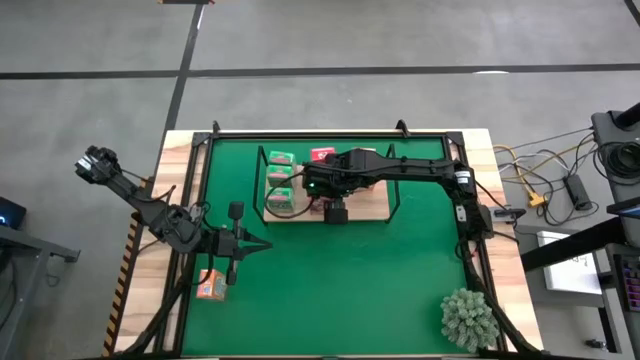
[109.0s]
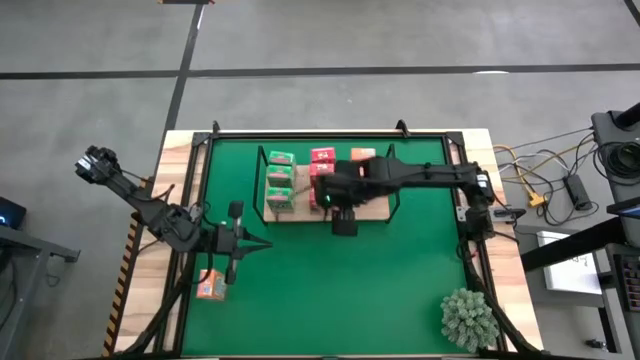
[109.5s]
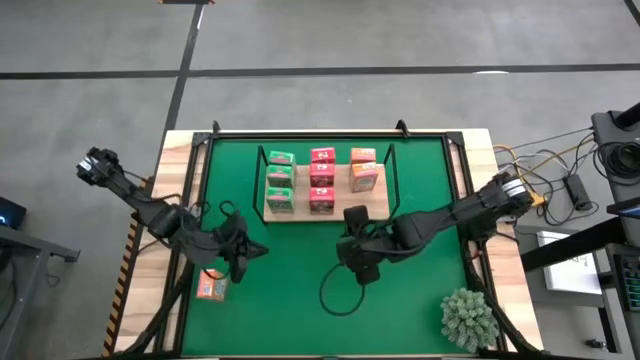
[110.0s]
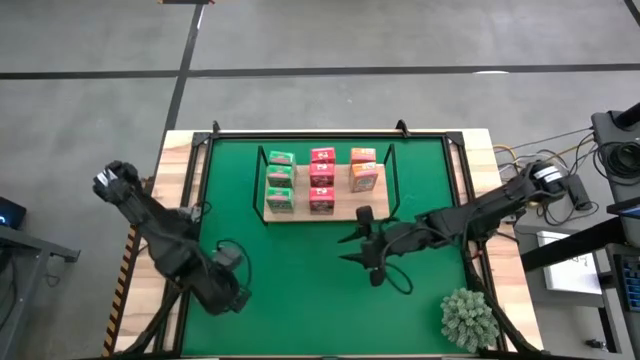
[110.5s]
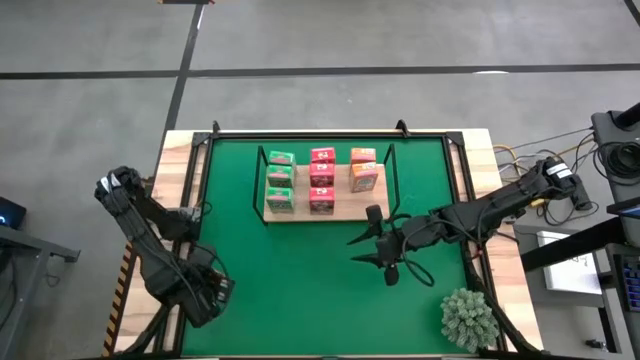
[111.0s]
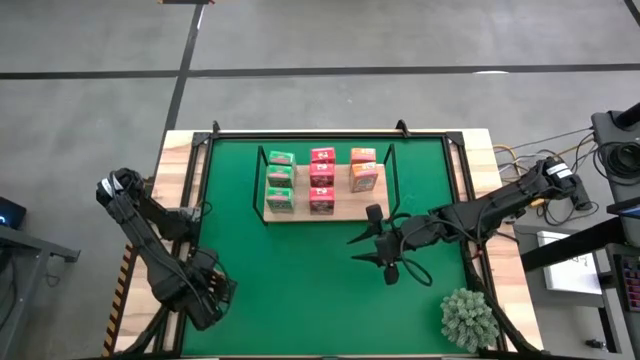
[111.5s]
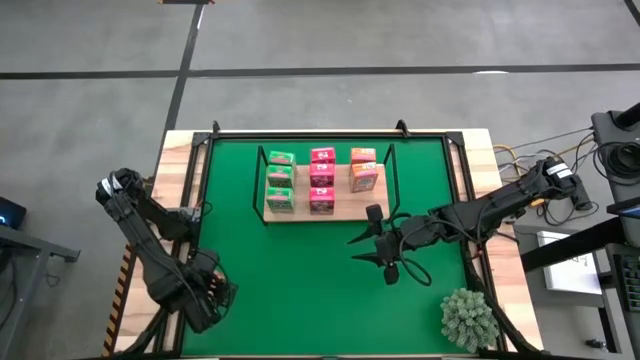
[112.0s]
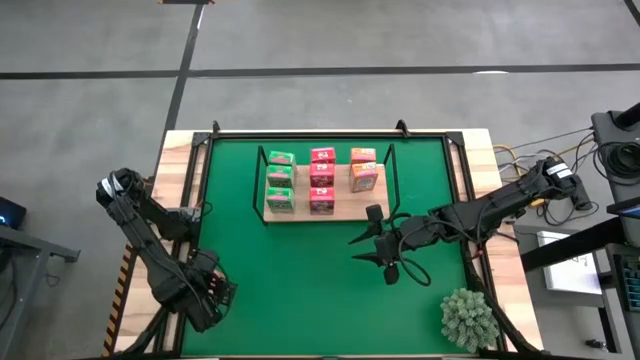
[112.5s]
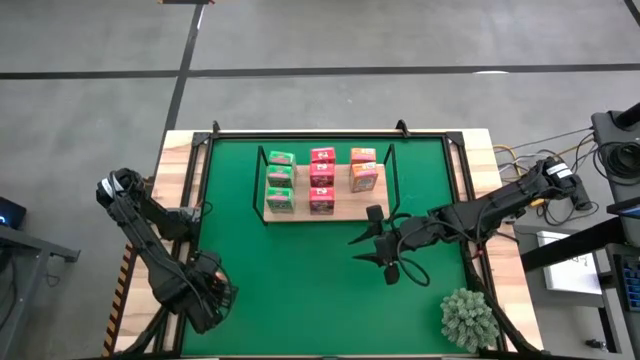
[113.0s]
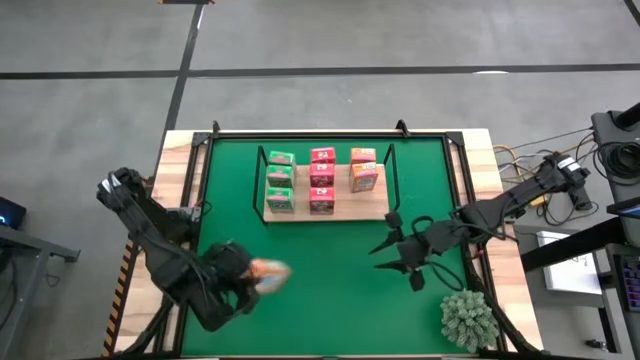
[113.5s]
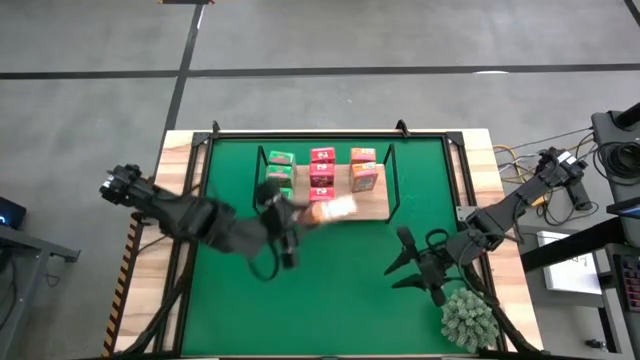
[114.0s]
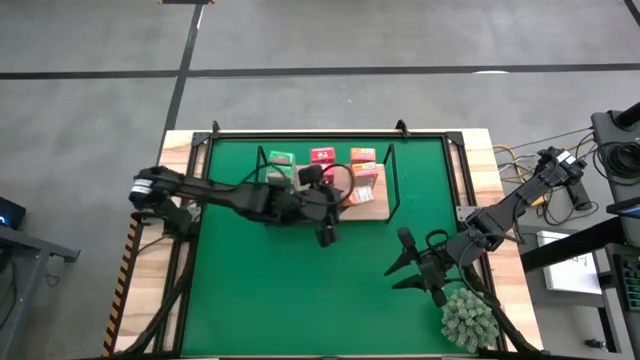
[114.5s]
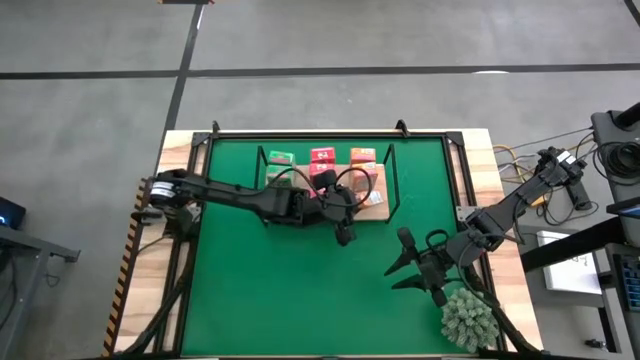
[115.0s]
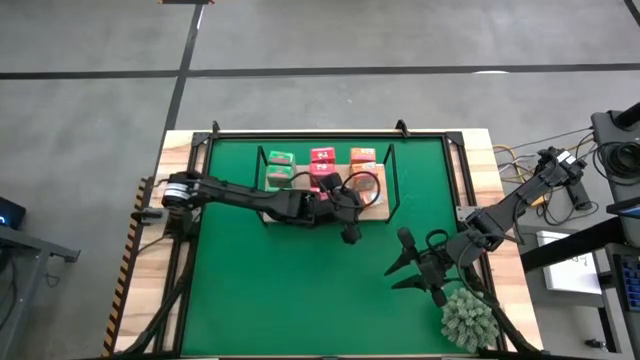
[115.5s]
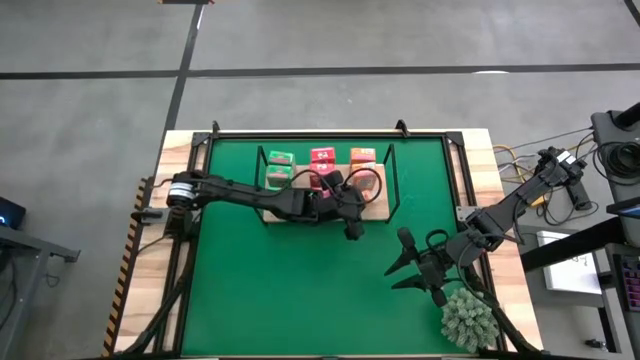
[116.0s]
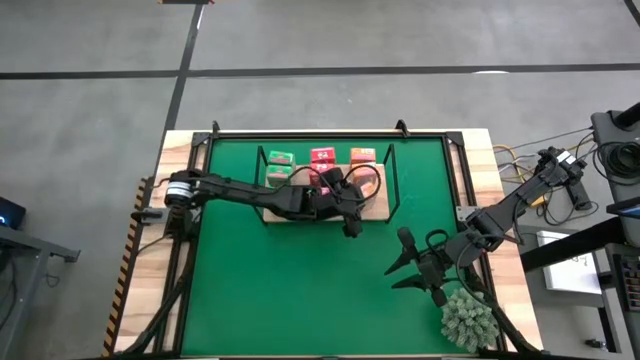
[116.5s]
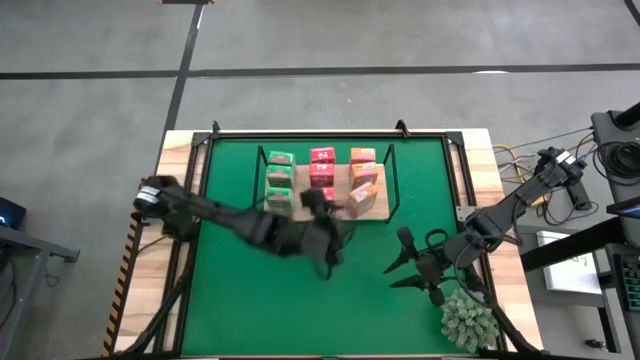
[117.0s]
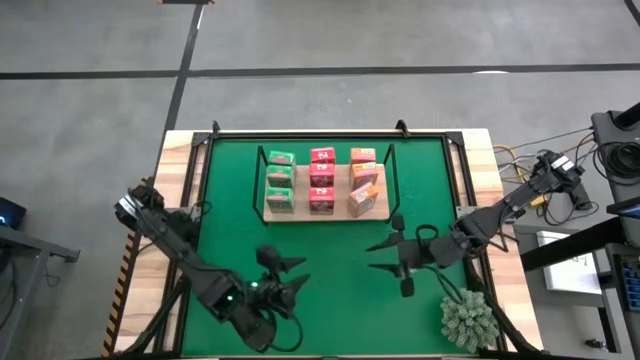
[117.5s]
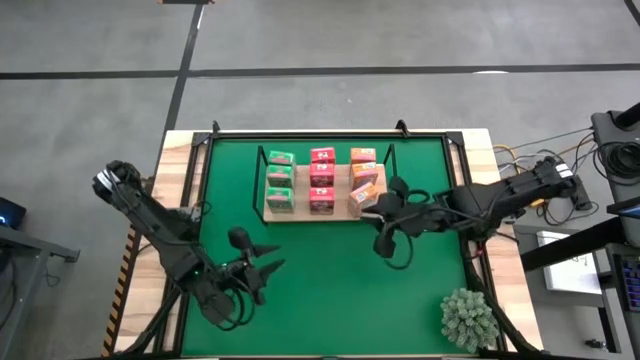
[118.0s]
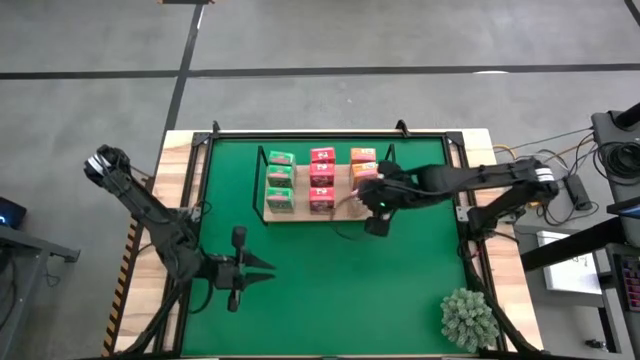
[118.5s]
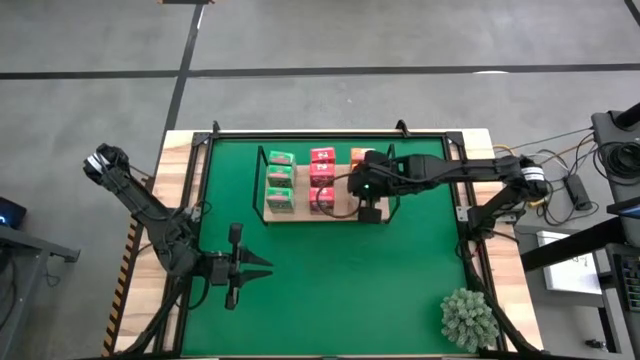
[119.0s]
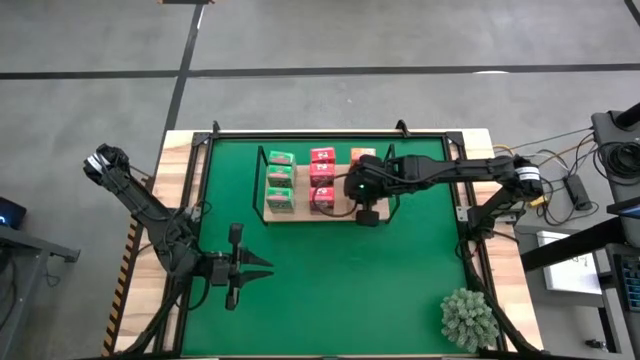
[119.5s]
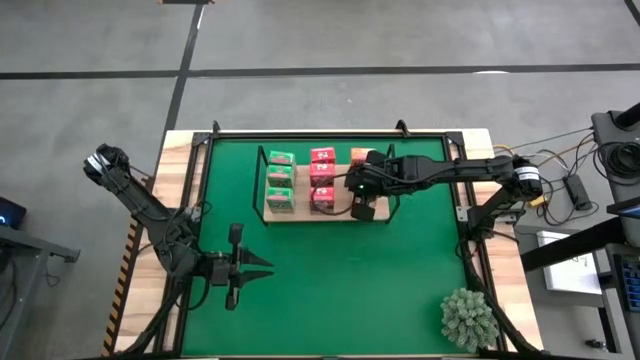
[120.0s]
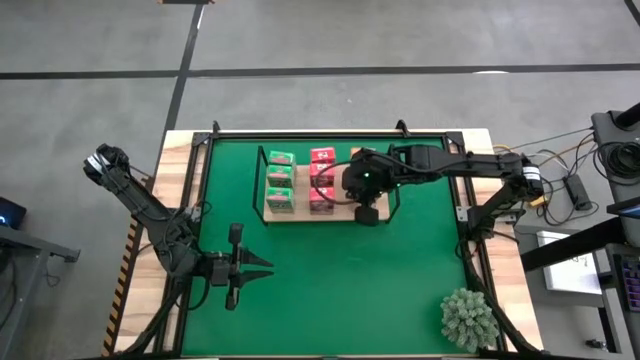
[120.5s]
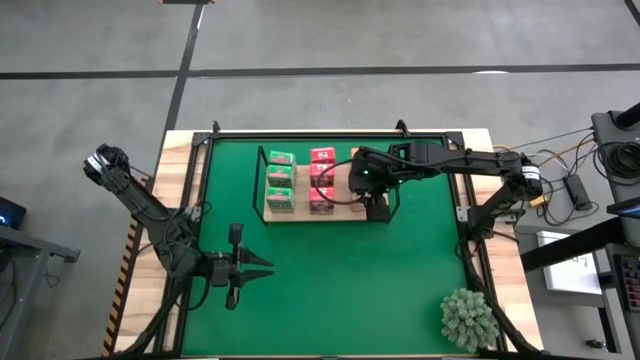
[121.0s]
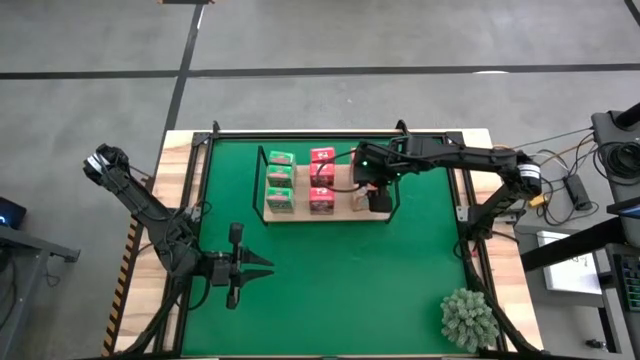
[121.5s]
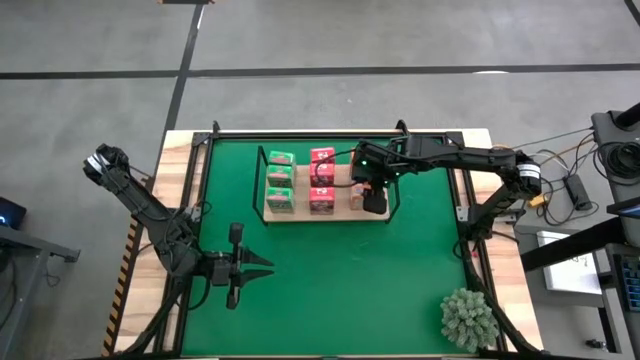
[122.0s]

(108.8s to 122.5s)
Task: Stack cereal on shelf
Put the orange cereal box on the shelf aligned with the other orange cereal boxes

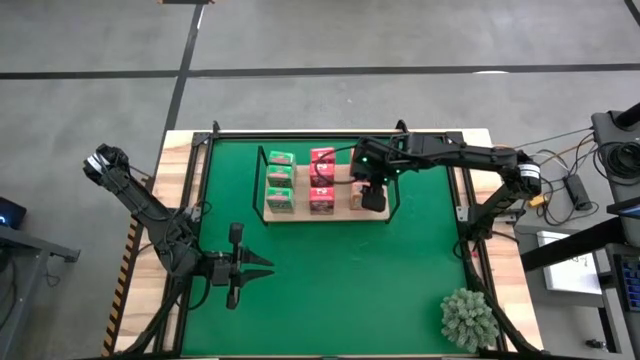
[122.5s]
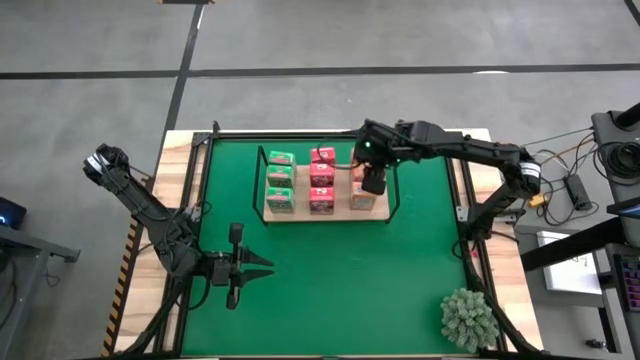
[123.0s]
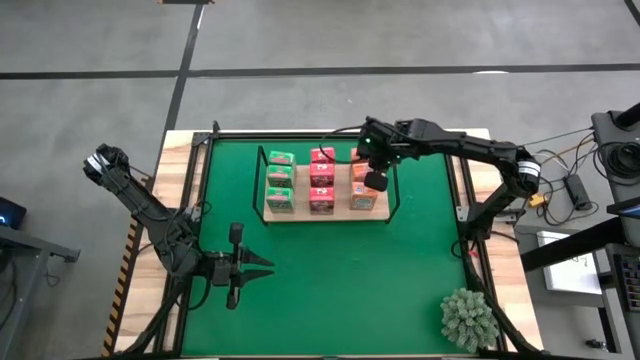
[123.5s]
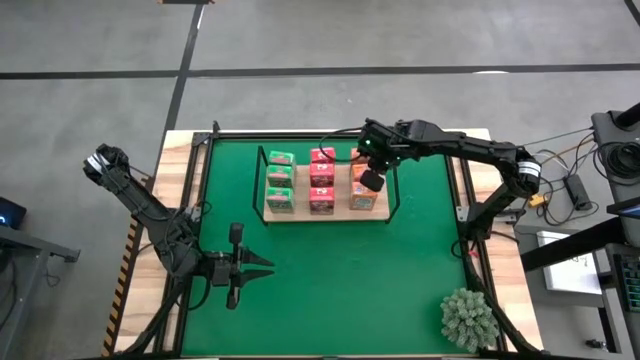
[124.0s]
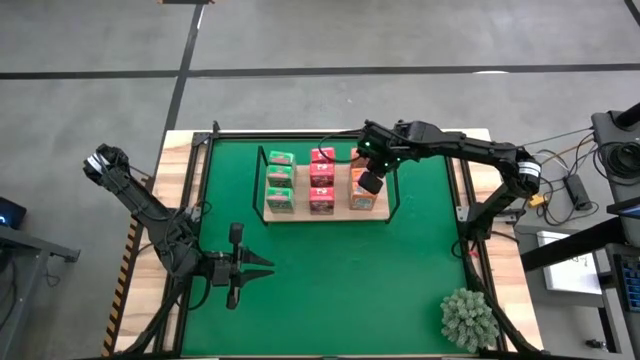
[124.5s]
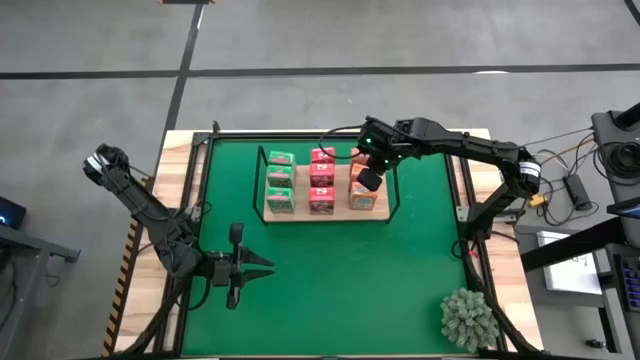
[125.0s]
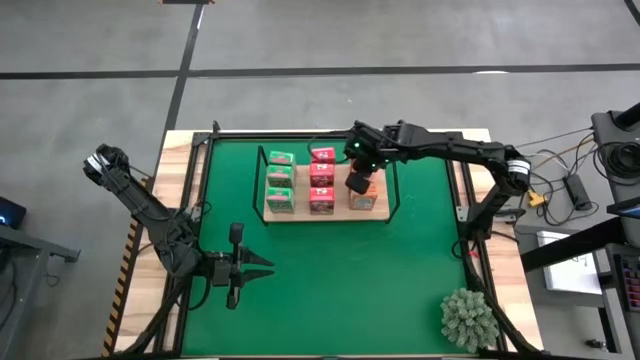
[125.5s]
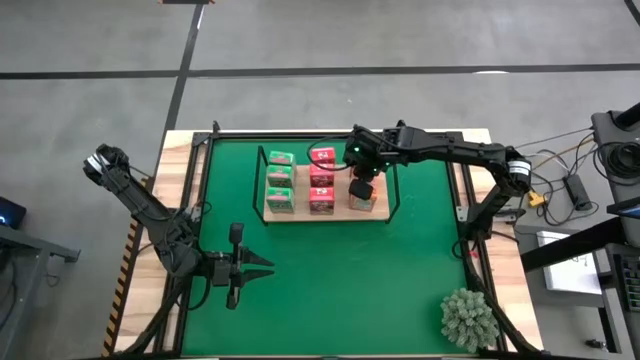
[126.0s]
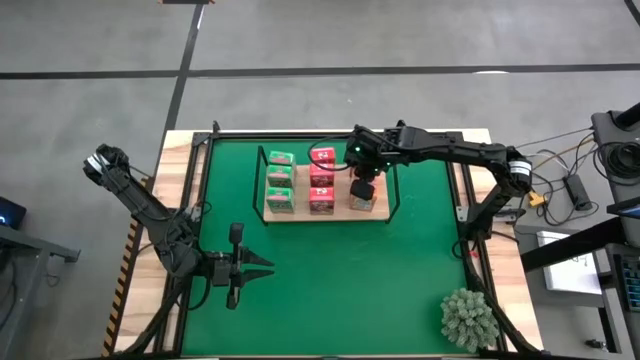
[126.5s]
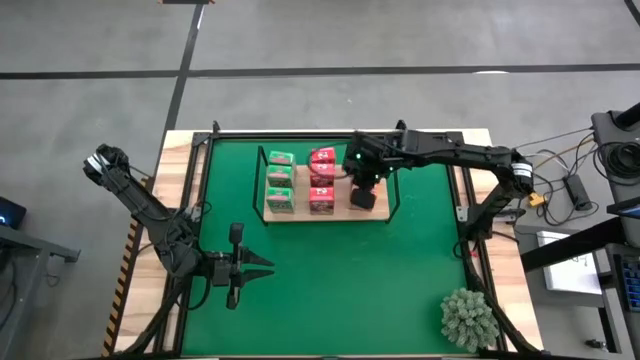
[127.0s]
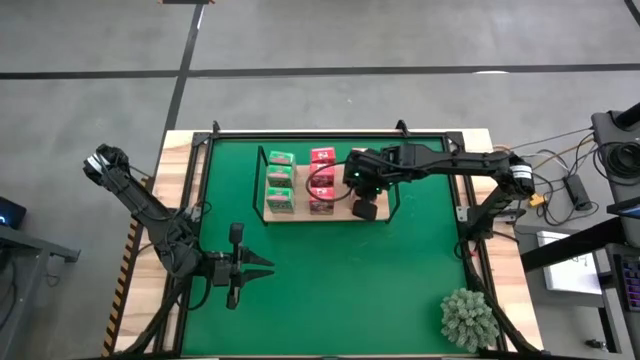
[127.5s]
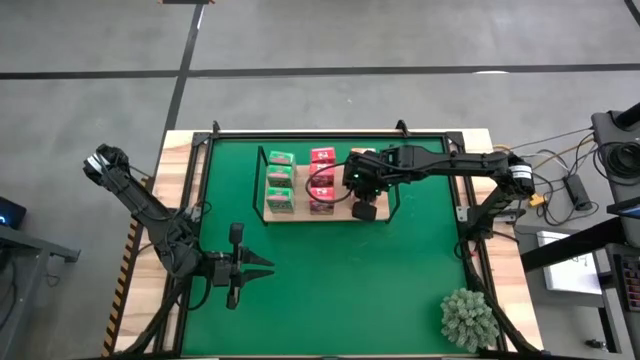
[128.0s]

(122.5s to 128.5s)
Adjust the orange cereal boxes on the shelf

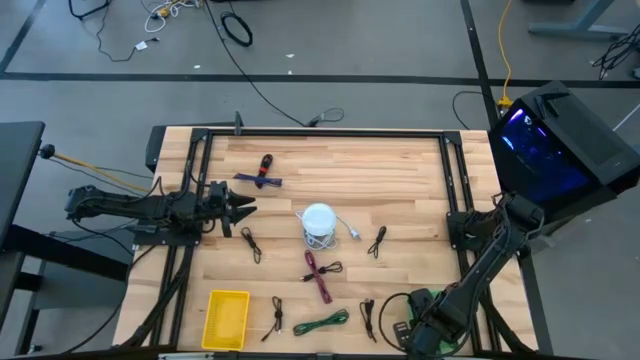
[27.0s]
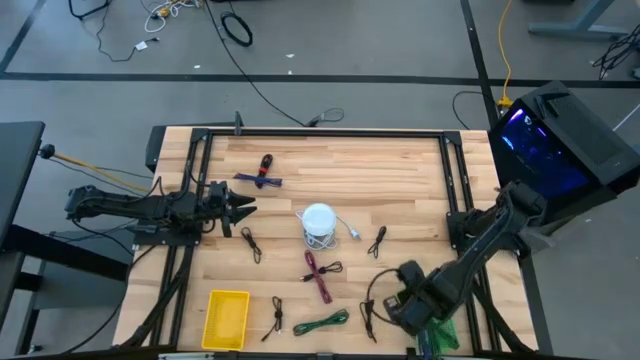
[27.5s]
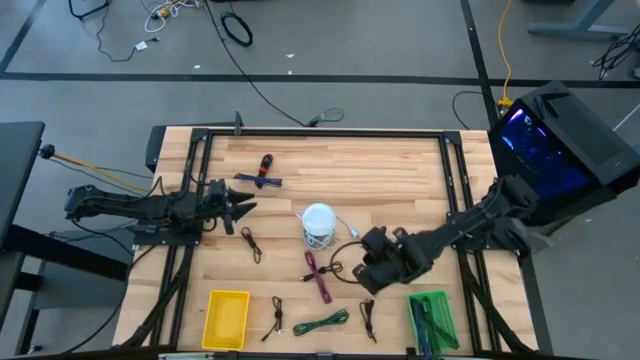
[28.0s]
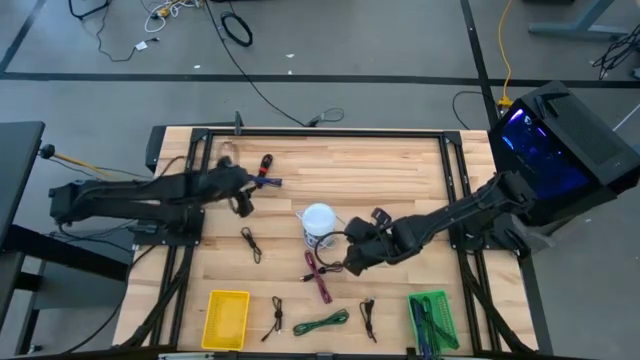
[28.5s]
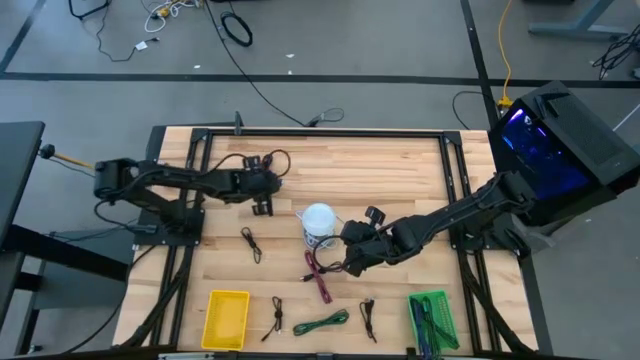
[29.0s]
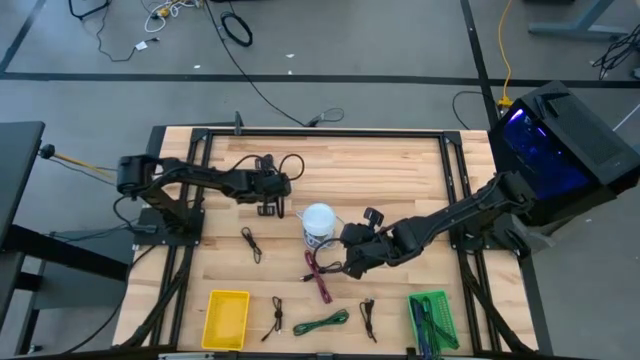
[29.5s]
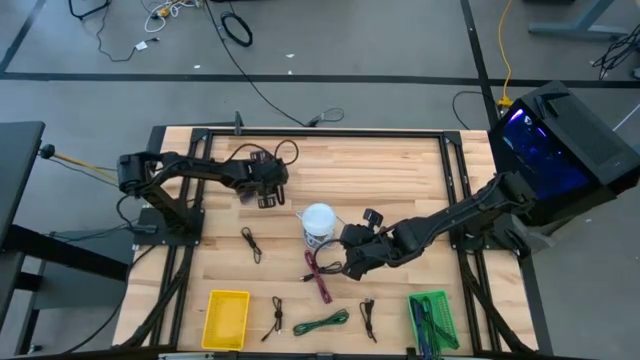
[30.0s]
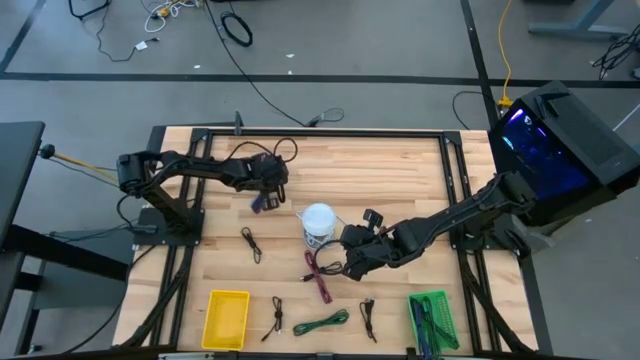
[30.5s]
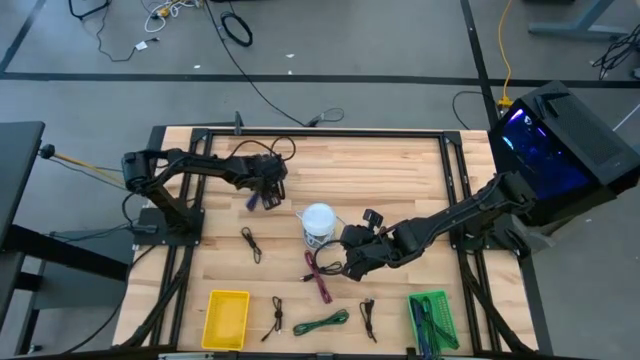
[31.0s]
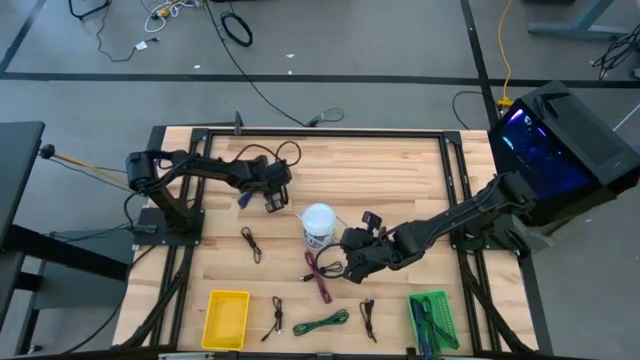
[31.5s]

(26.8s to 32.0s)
Task: Pick & Place USB Port
Put the purple charger cable into the green bin
